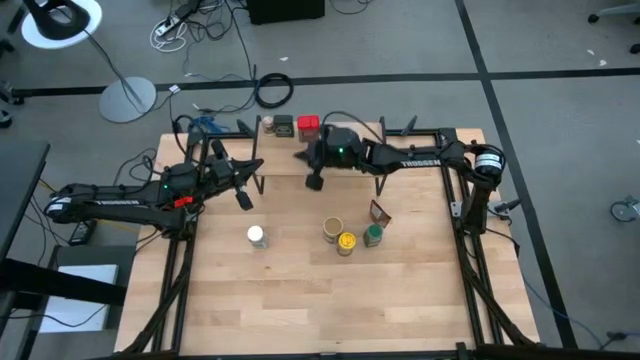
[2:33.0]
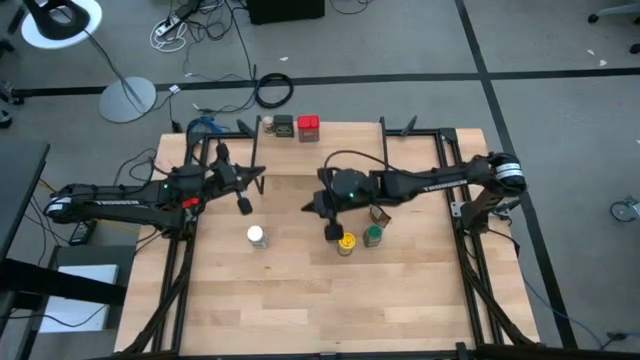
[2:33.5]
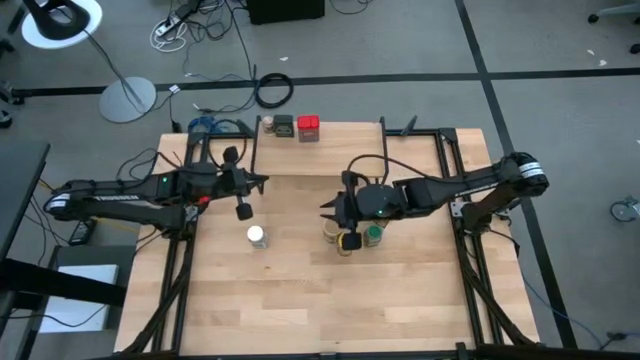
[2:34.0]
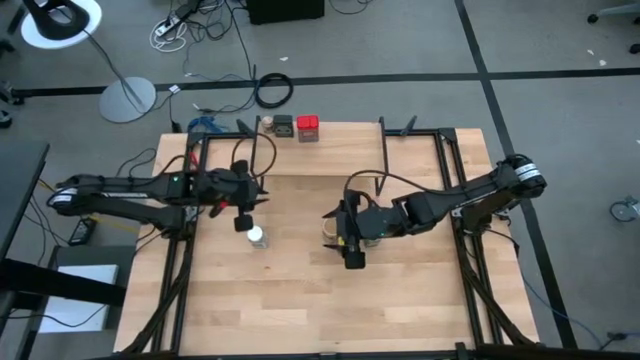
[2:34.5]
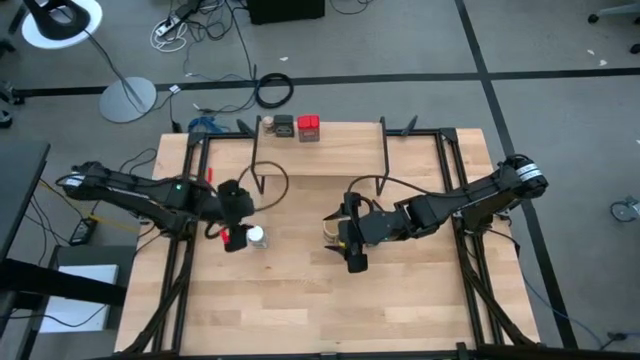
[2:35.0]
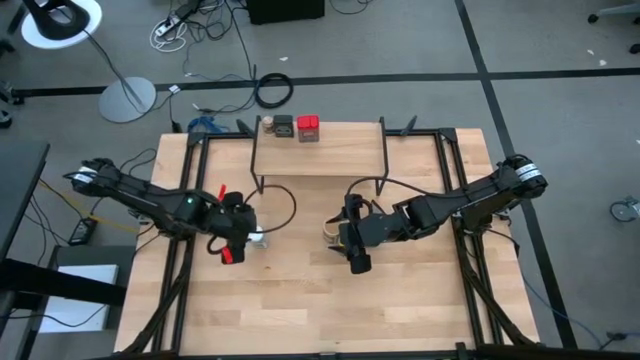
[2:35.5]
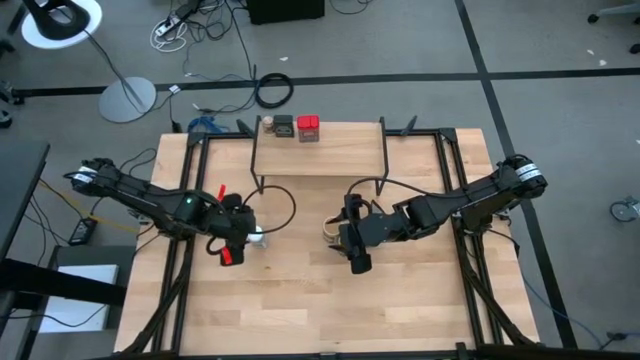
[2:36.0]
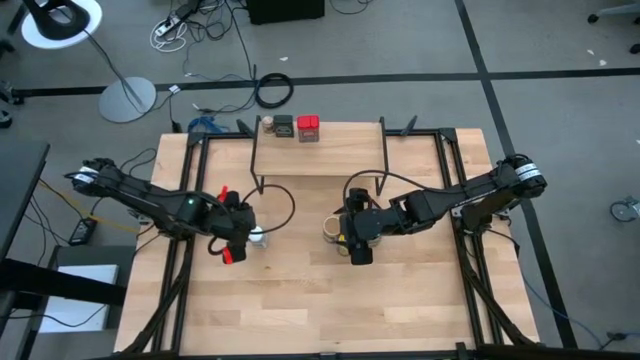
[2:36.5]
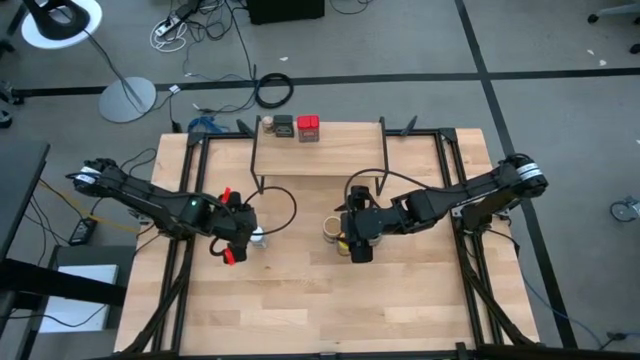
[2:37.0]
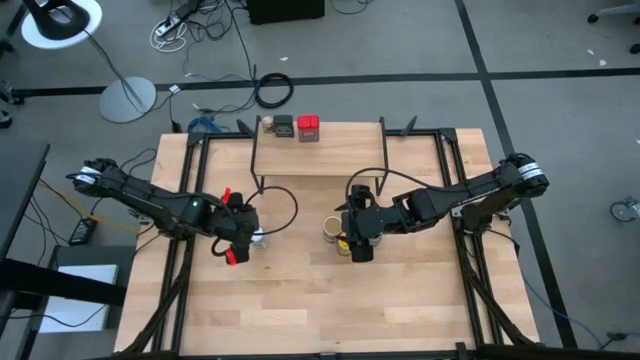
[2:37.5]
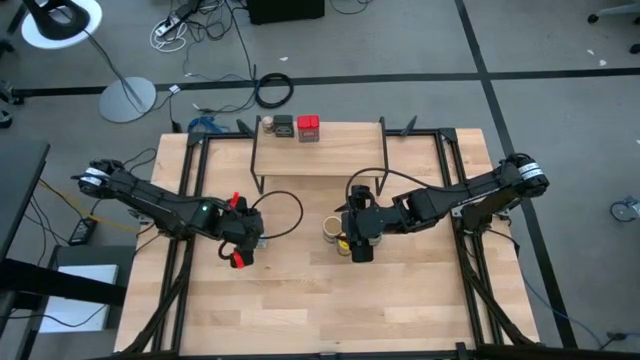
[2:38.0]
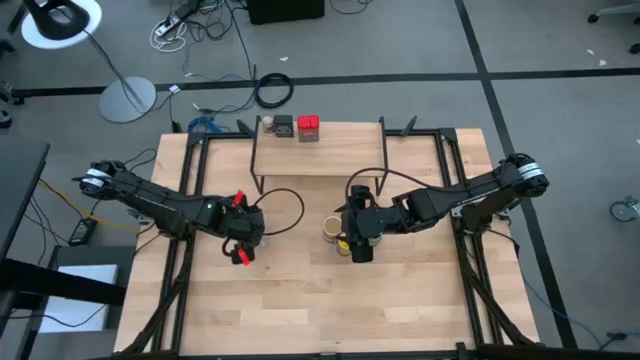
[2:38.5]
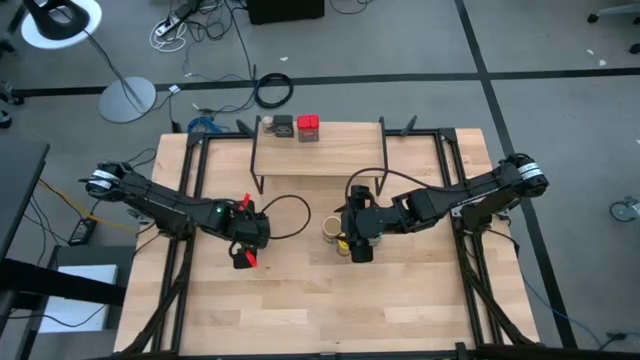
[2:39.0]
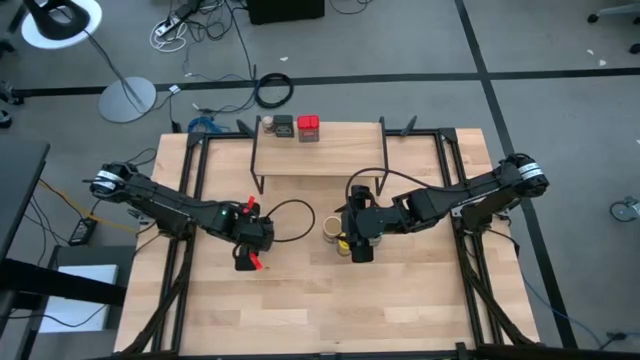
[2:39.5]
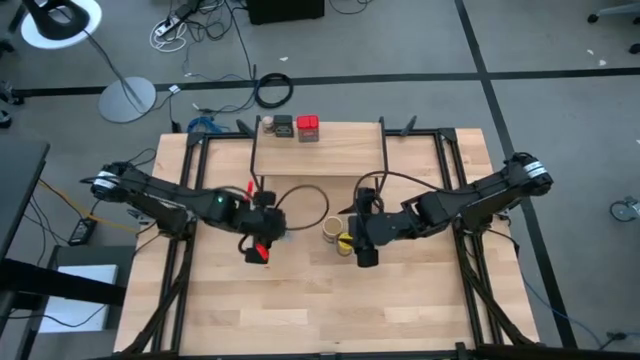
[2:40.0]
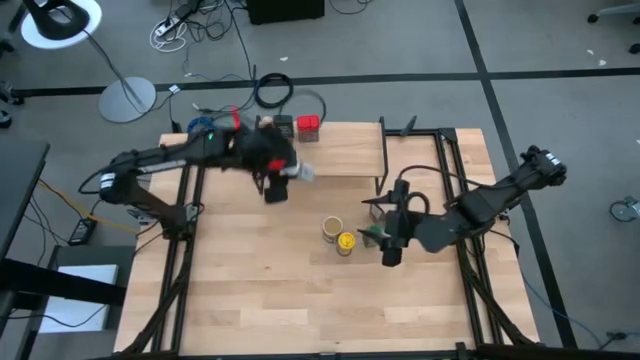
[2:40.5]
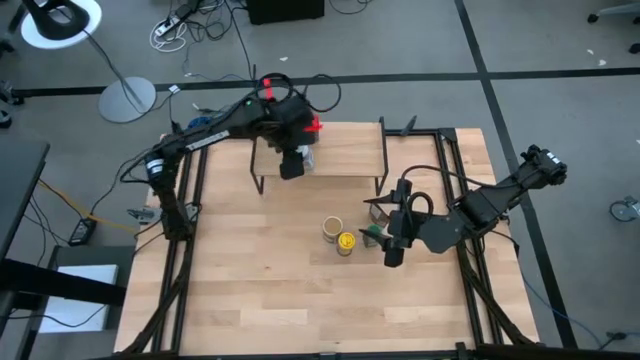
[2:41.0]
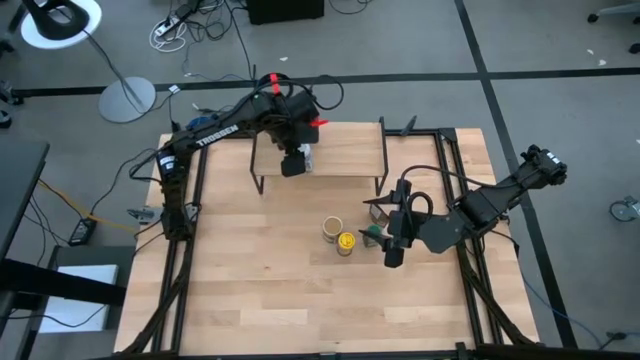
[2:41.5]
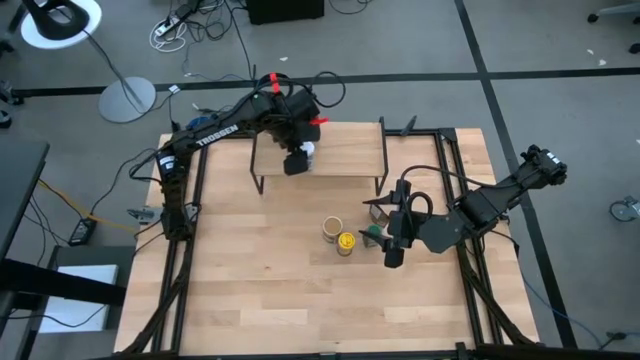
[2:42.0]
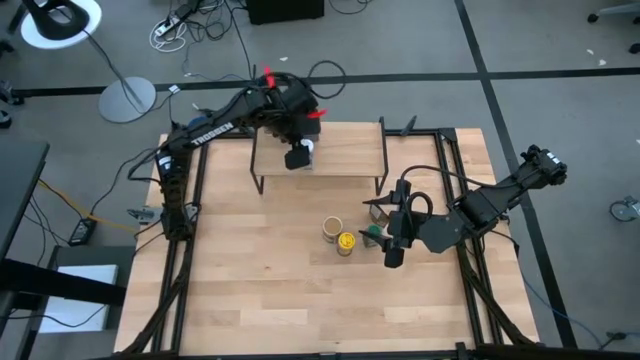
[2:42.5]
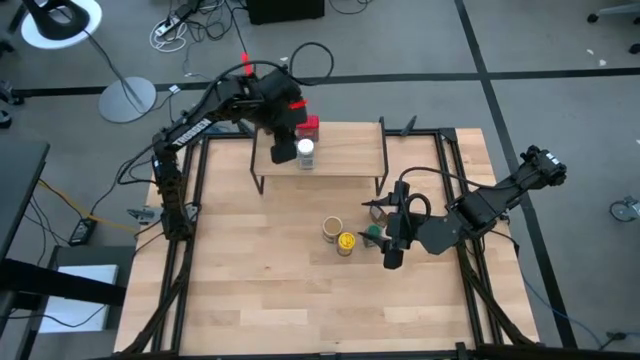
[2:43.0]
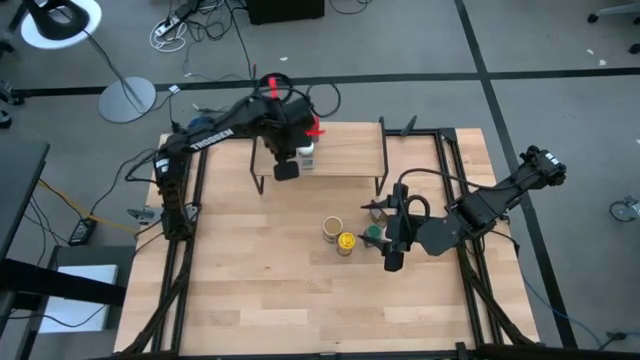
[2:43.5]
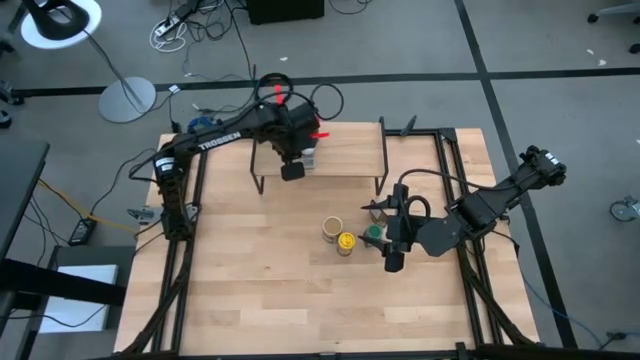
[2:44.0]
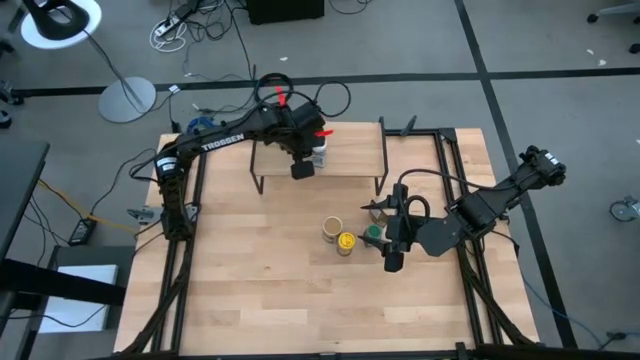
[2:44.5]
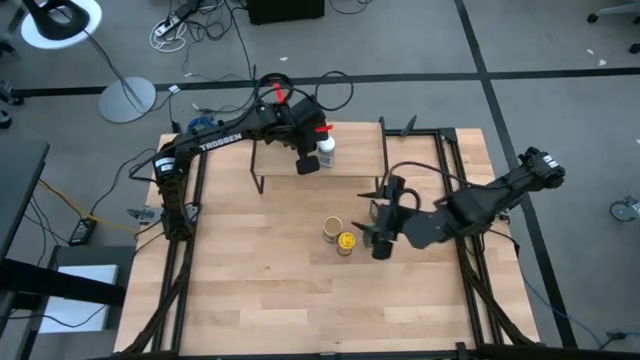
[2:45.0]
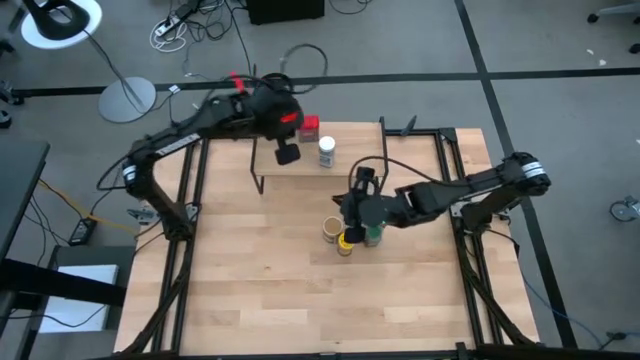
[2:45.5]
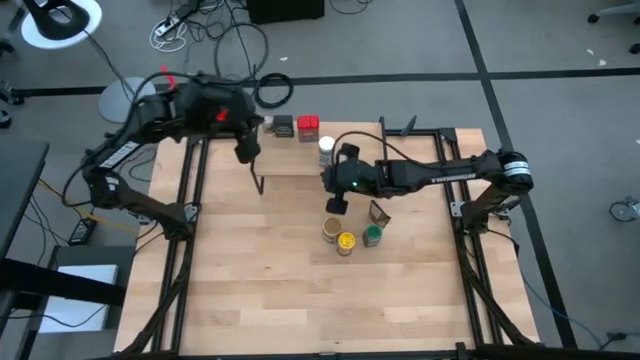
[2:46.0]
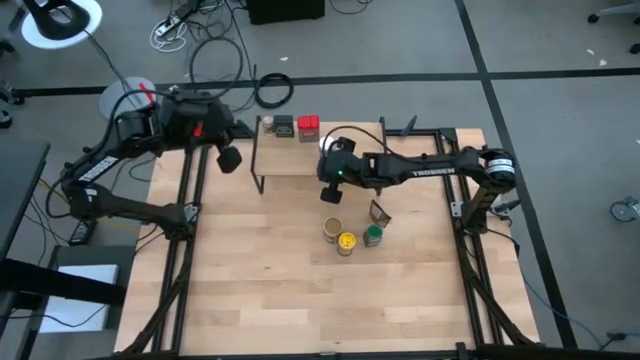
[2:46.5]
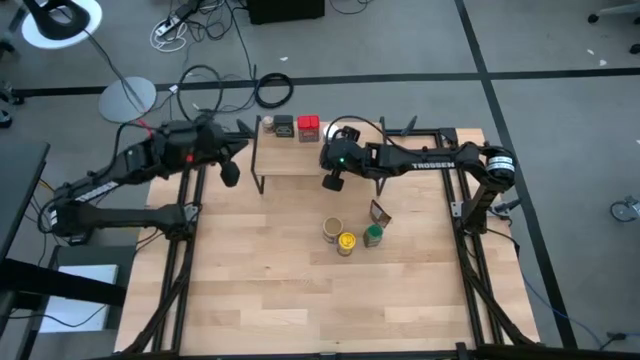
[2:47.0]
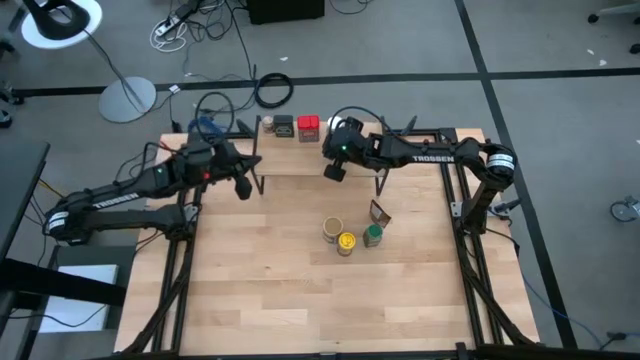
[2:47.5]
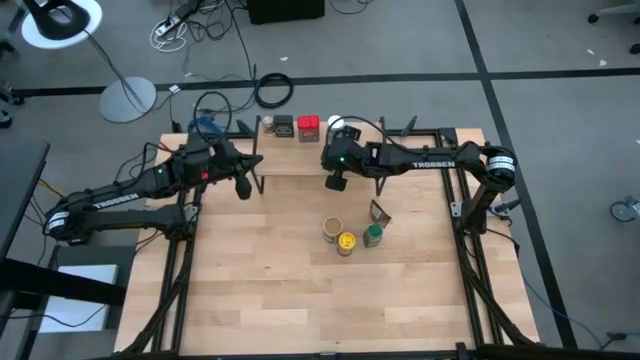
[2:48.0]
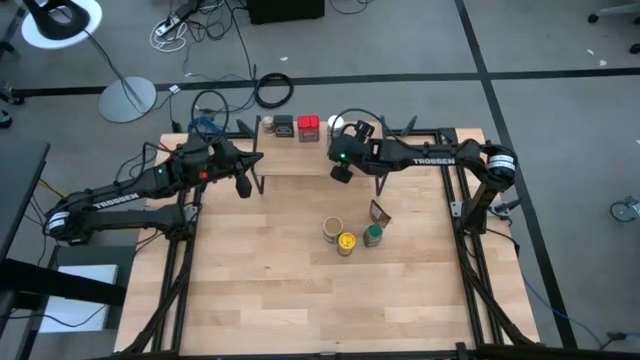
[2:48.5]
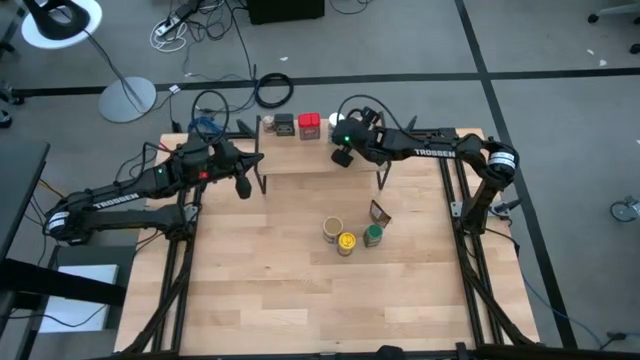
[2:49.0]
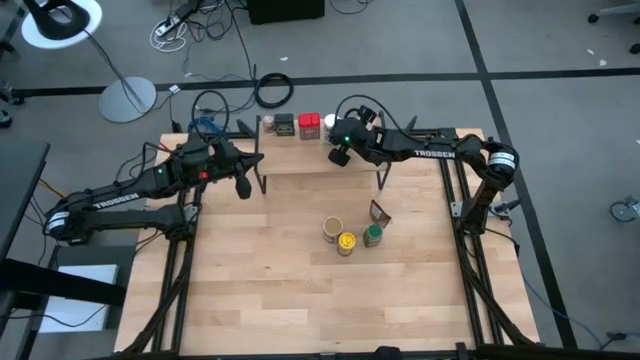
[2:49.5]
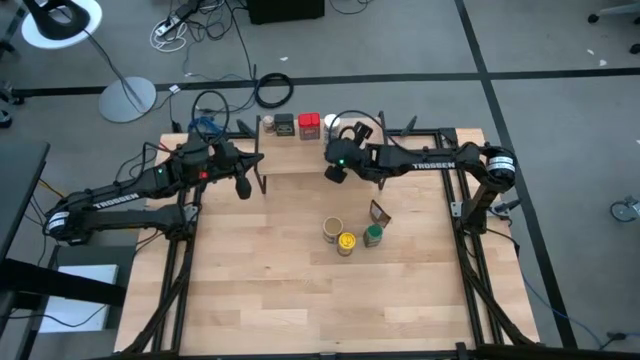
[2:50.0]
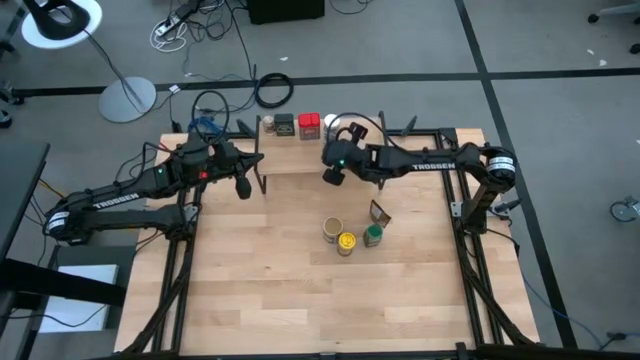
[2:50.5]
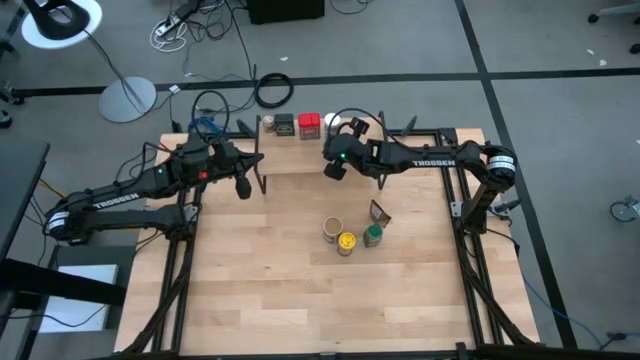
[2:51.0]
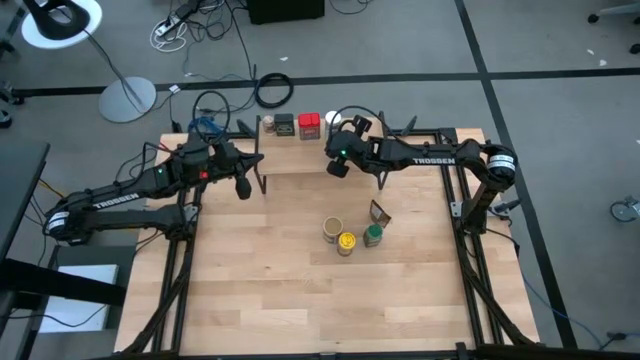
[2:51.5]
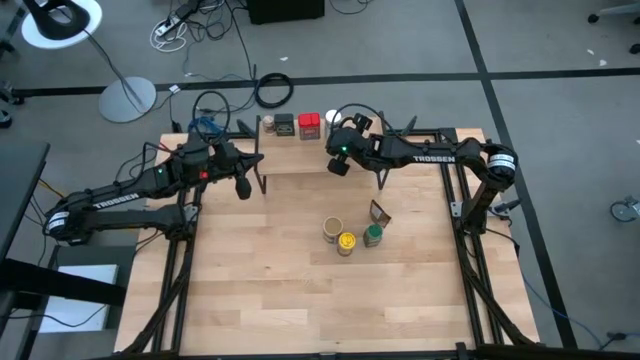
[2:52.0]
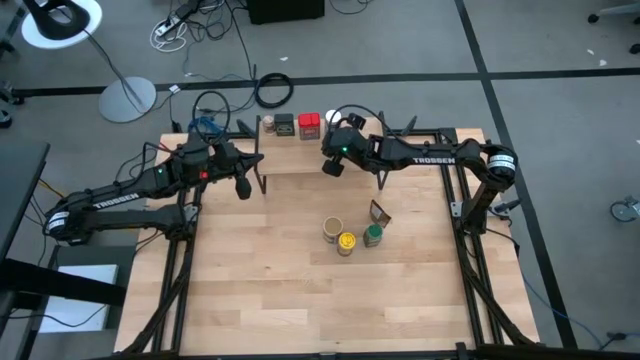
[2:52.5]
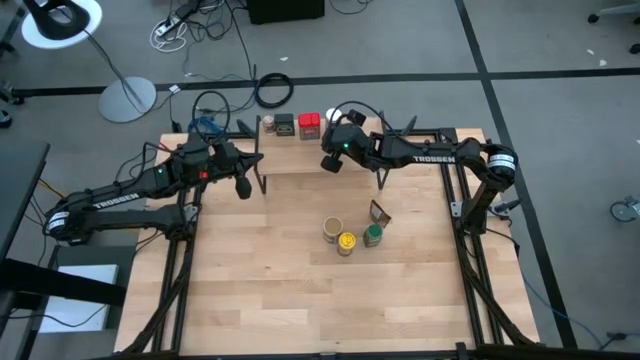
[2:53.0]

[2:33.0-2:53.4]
Task: Shelf spices
Put the white seasoning bottle on the shelf

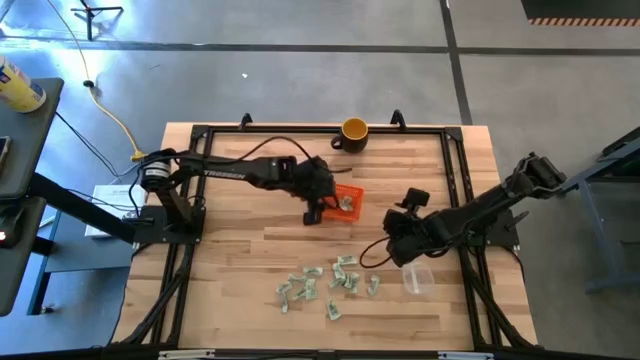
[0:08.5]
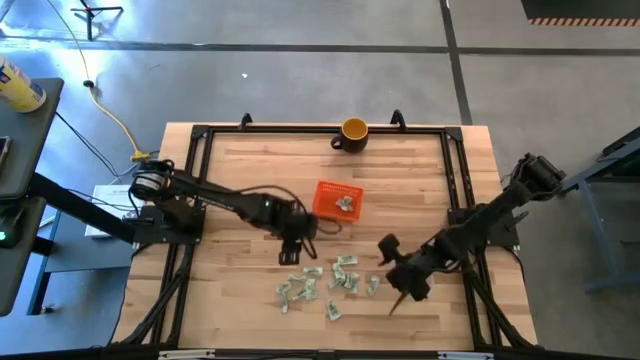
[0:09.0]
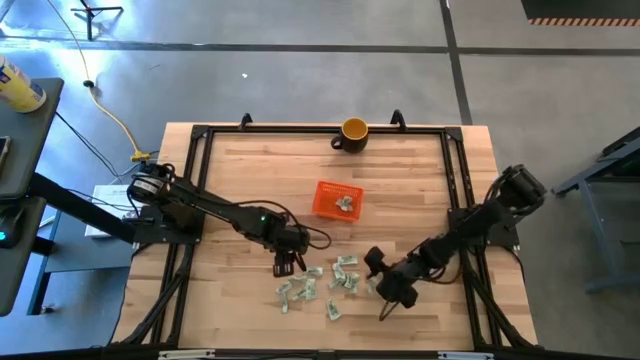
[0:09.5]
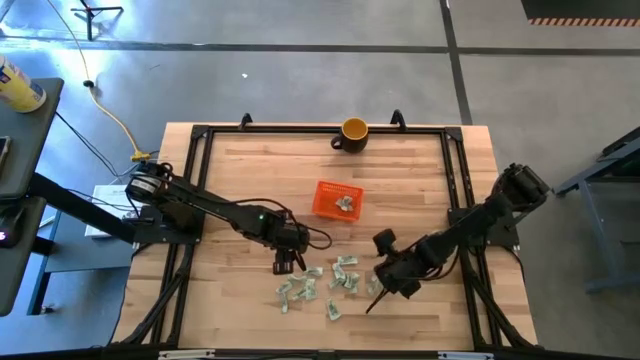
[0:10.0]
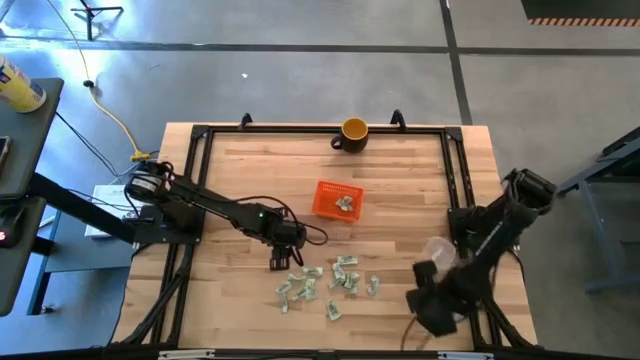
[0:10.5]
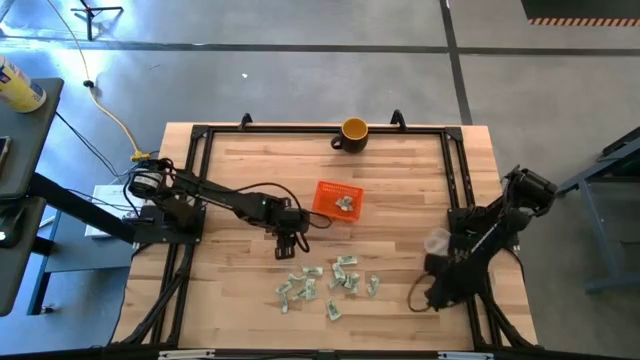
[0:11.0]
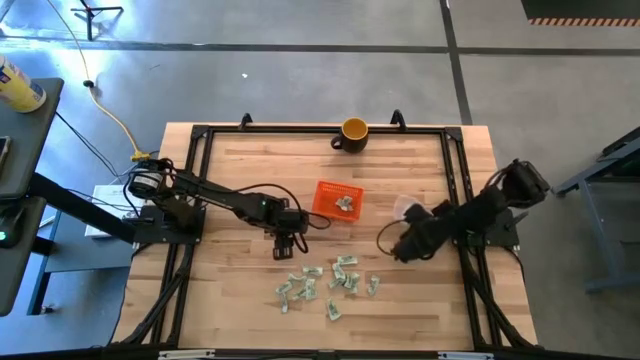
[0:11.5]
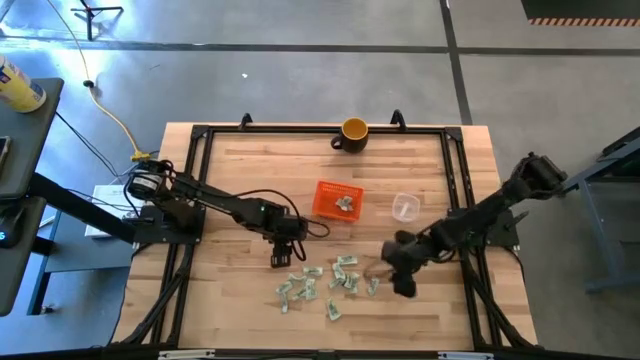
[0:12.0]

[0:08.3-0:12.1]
Task: Pick and place items into bin
Move the transparent bin
